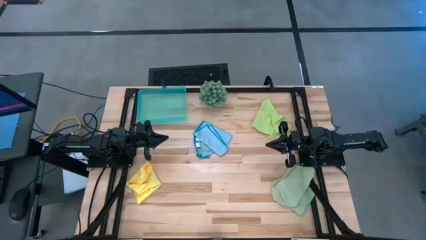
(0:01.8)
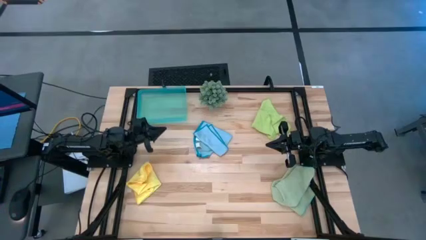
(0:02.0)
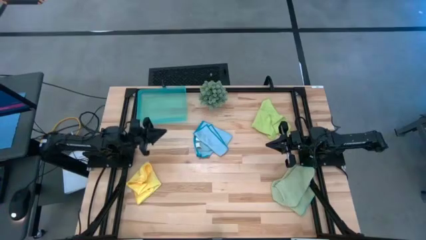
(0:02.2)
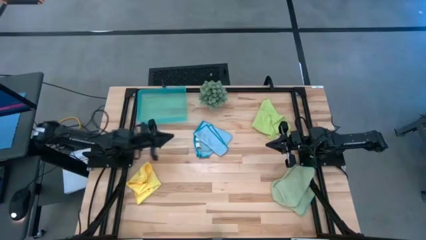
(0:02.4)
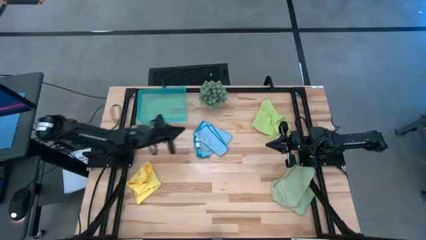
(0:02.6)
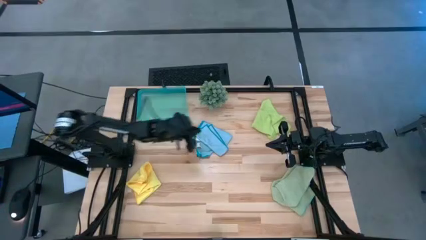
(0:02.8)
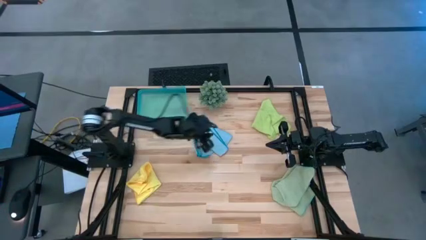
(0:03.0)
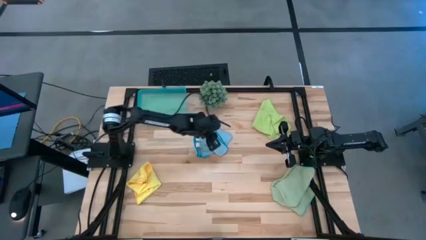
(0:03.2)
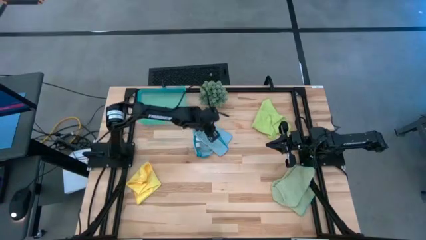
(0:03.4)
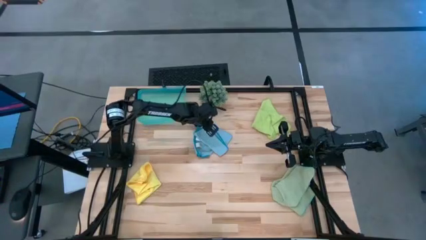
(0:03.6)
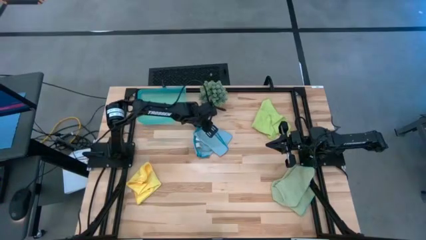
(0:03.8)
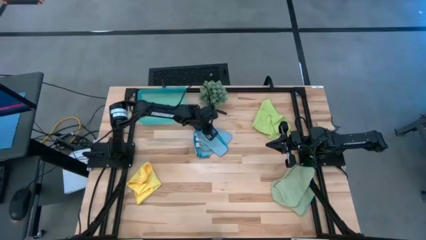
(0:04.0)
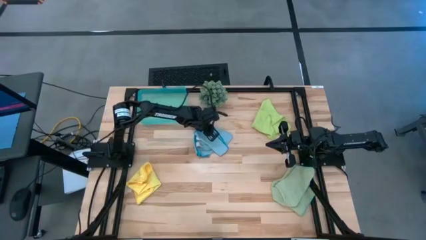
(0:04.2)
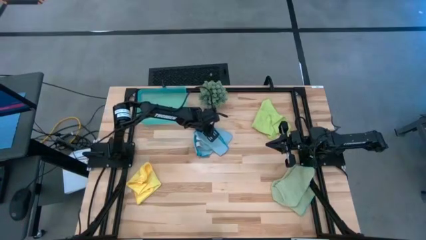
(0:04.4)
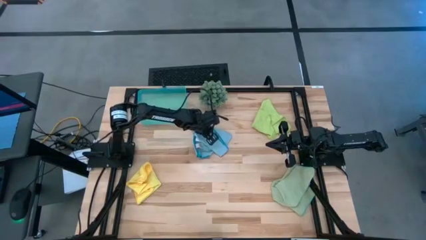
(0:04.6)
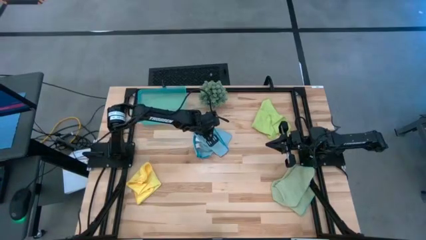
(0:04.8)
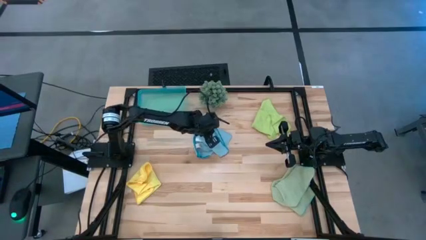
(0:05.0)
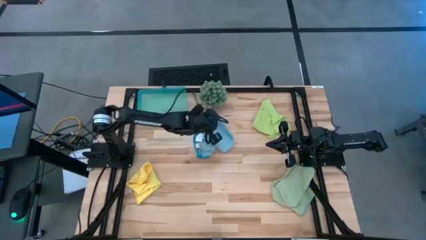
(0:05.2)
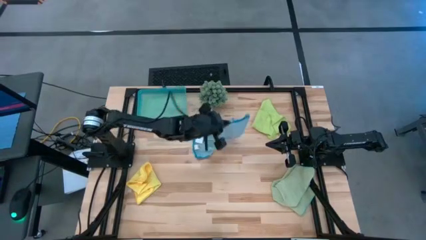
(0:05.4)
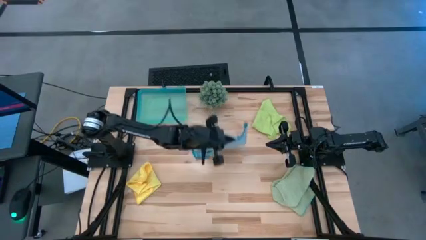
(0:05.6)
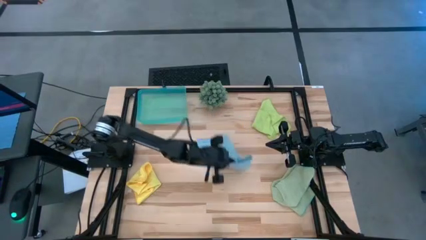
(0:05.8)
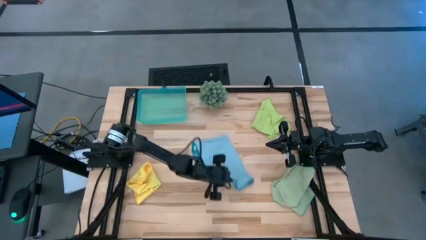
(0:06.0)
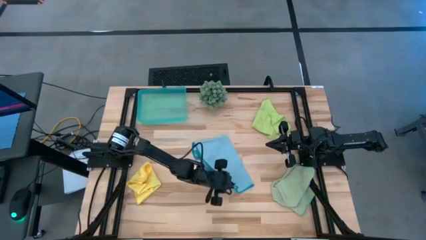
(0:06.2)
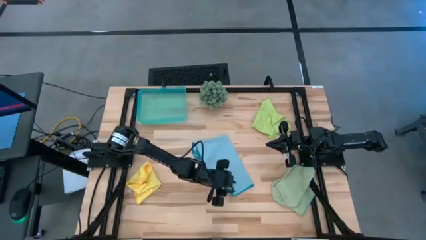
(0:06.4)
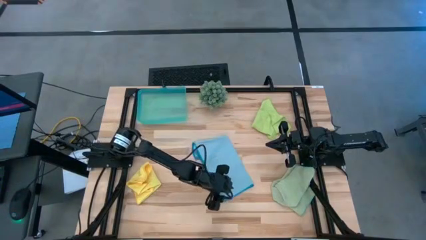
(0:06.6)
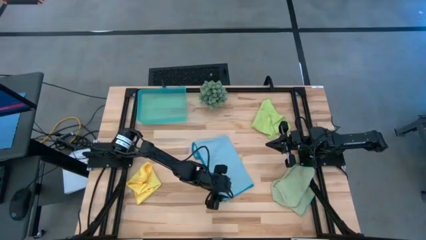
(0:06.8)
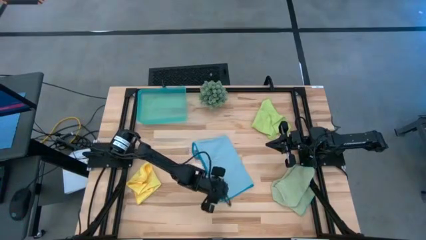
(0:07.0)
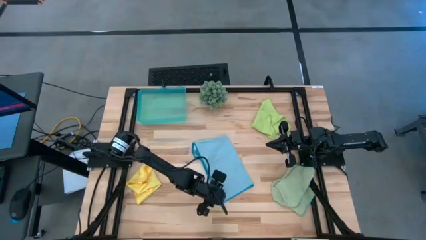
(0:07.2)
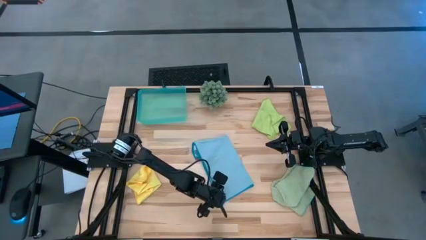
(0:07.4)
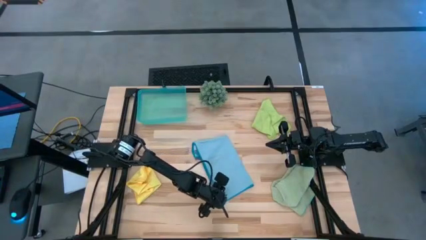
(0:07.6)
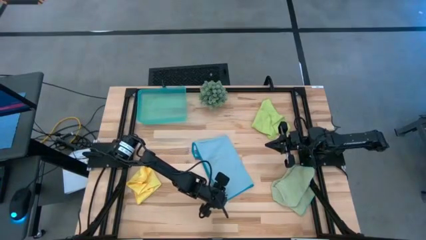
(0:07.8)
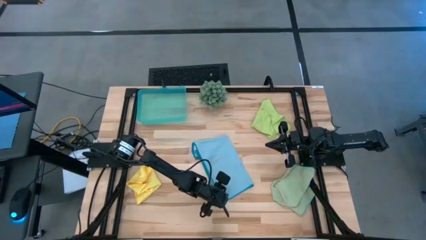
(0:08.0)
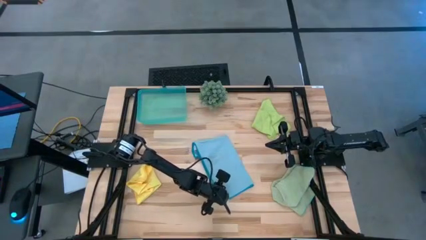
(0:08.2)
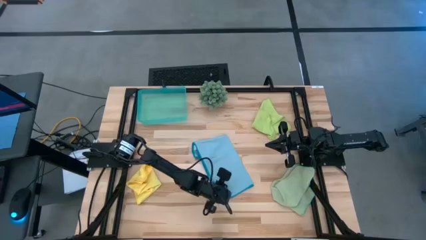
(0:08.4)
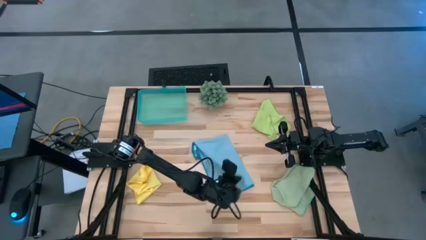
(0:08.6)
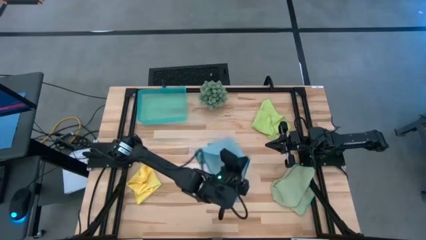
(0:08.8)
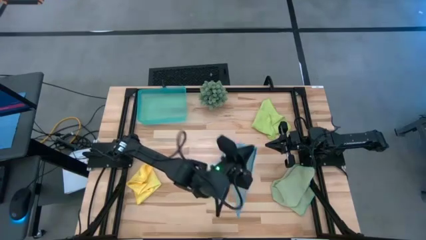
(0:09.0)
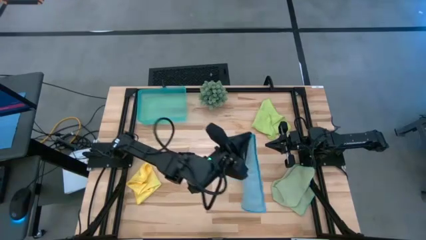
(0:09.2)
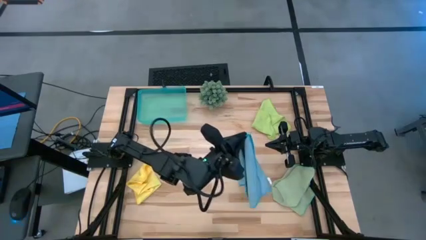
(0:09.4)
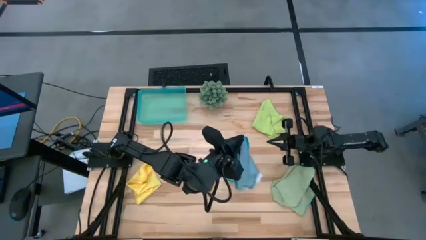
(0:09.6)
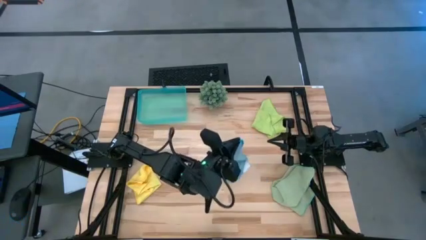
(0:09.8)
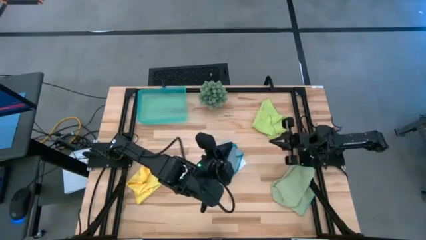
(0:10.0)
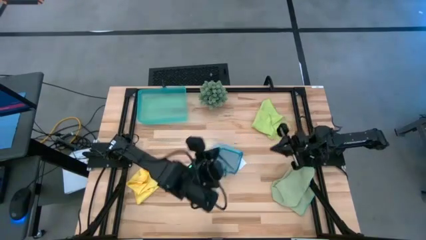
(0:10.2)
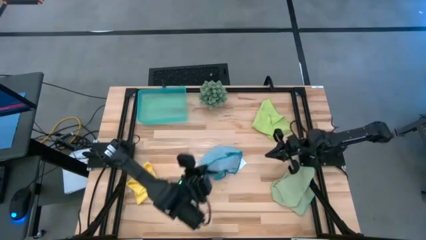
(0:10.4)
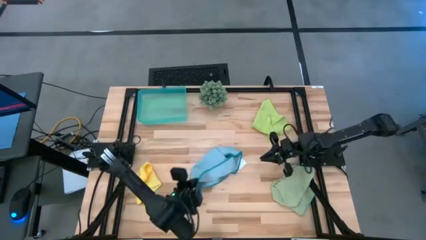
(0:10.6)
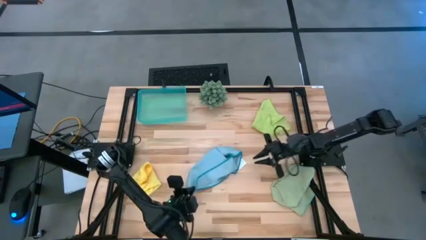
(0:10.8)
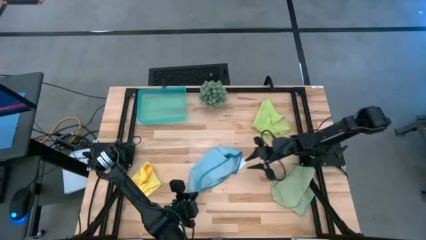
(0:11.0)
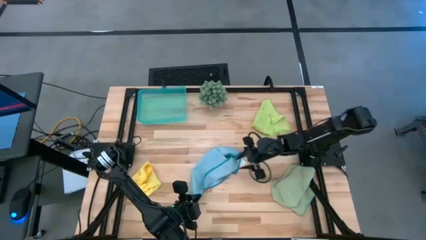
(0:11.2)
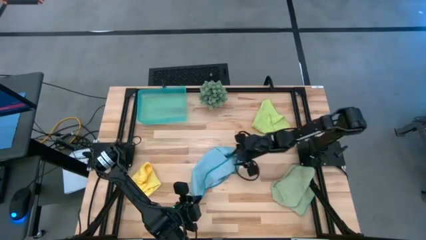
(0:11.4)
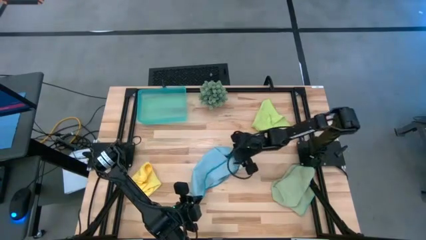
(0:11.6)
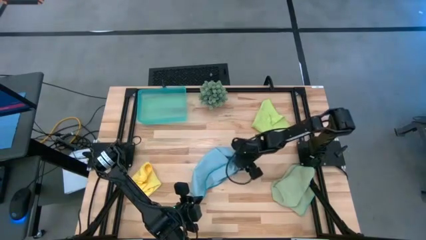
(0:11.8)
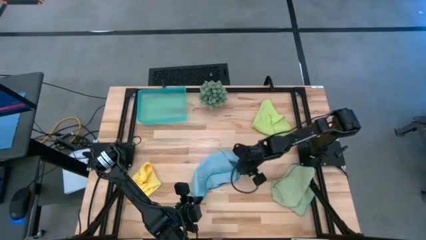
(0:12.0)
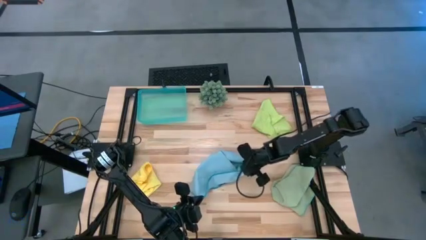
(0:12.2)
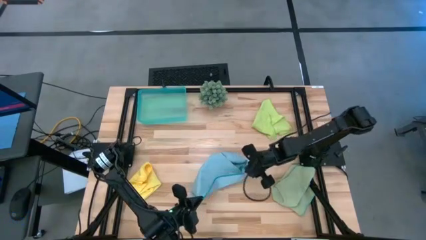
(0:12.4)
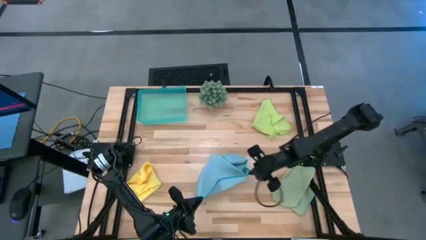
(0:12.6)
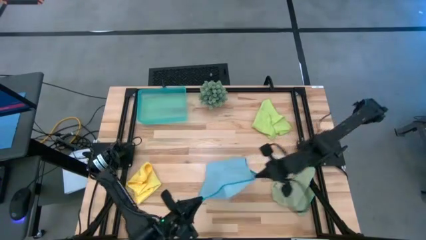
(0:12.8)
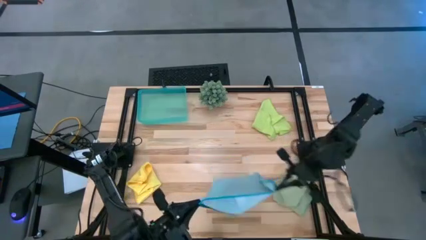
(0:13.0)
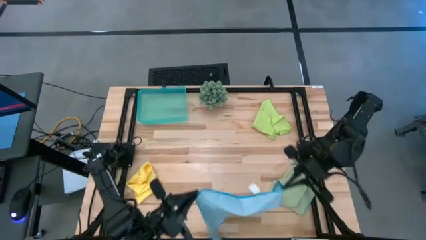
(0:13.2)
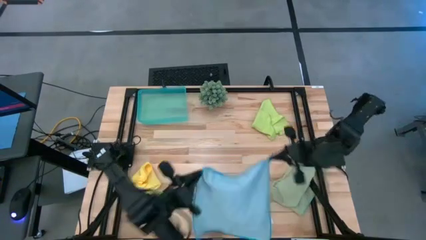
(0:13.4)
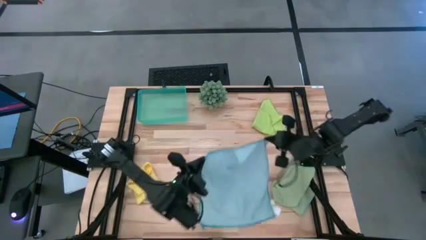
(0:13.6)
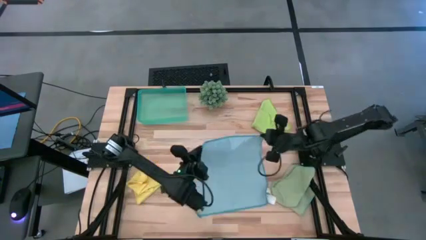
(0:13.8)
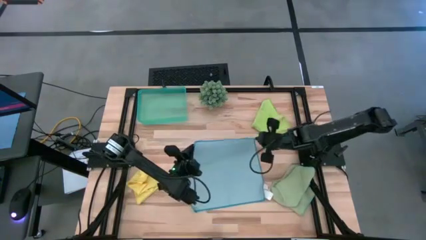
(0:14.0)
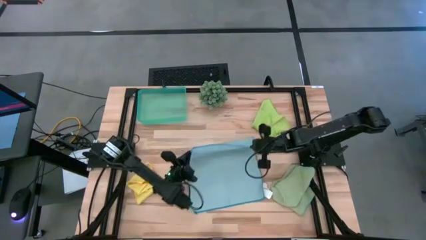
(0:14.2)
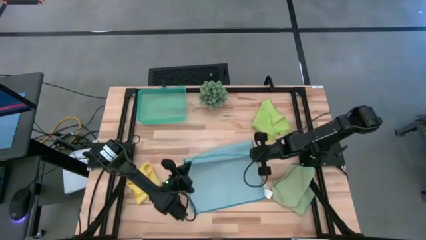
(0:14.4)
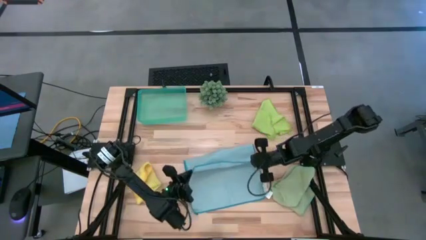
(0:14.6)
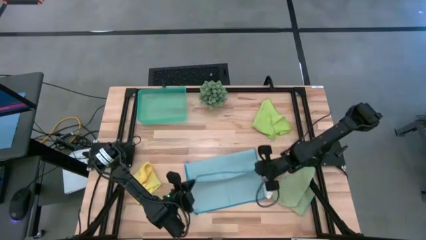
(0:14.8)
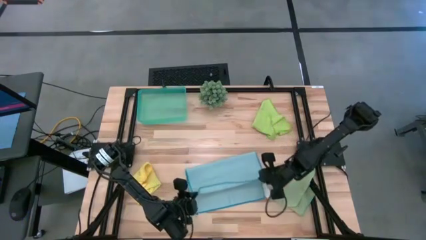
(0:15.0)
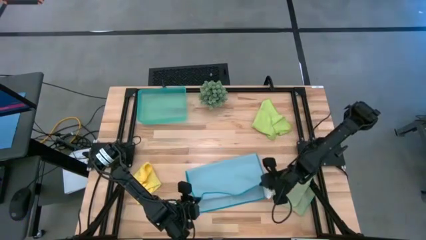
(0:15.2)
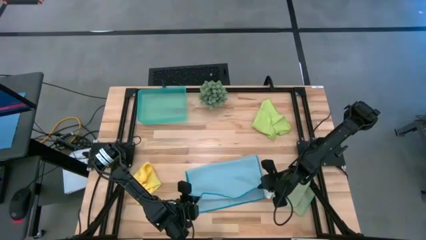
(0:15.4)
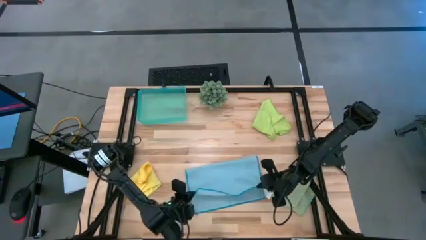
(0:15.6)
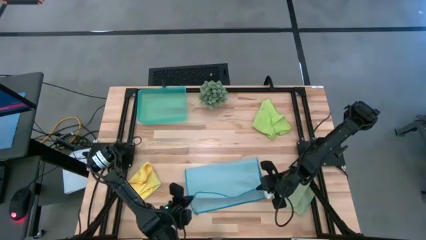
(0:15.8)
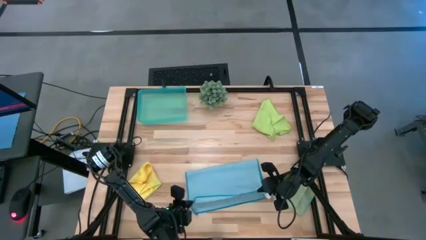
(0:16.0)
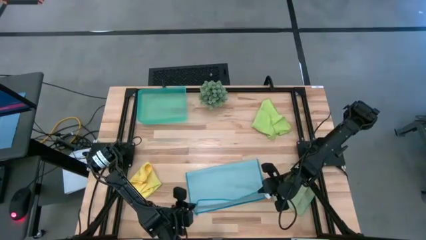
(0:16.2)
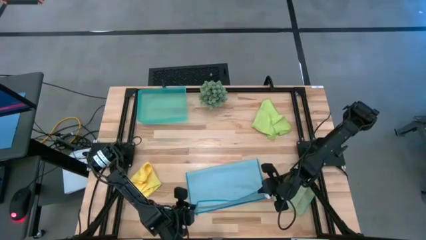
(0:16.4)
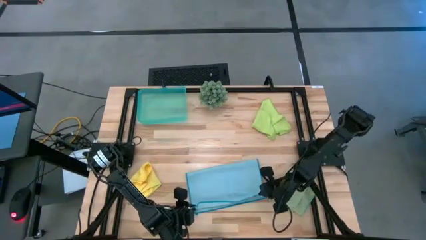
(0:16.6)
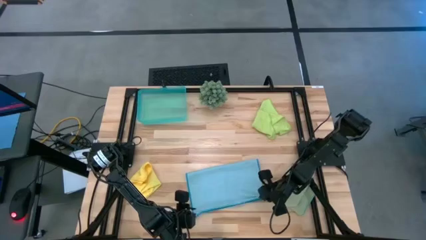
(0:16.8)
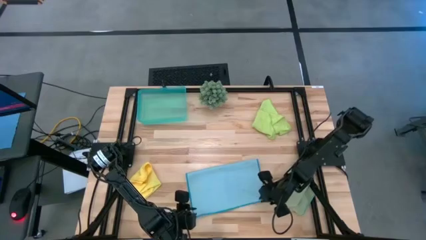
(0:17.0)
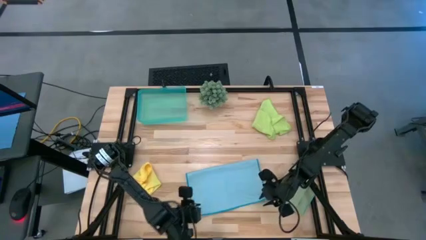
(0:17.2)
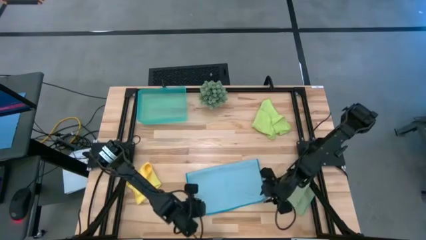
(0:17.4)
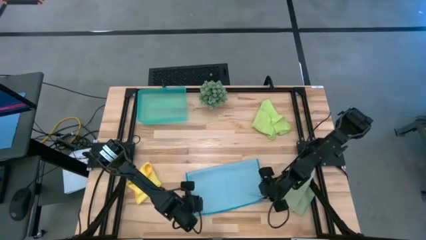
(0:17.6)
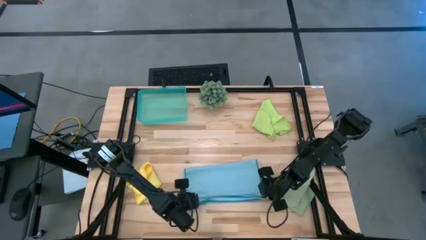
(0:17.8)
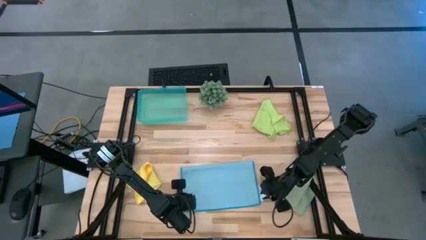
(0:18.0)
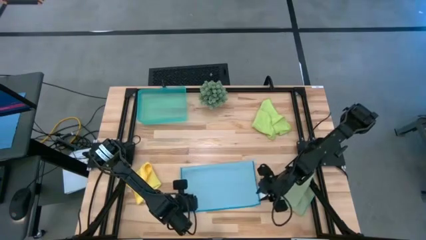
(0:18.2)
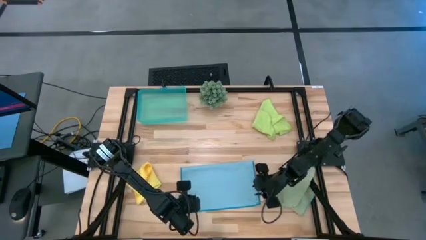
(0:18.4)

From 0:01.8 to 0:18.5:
Task: Fold microfiber towels
Fold the blue microfiber cloth
